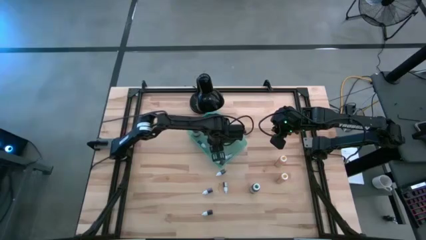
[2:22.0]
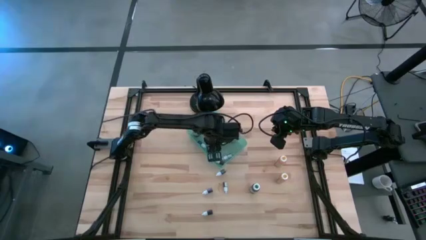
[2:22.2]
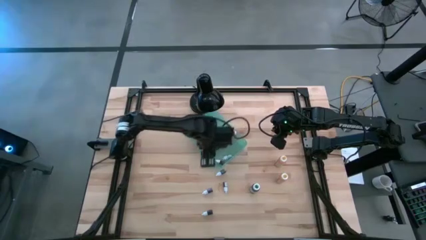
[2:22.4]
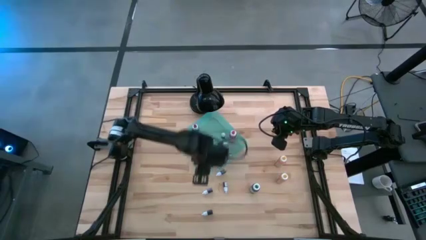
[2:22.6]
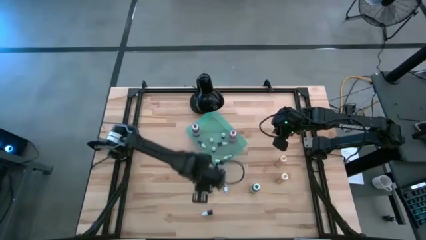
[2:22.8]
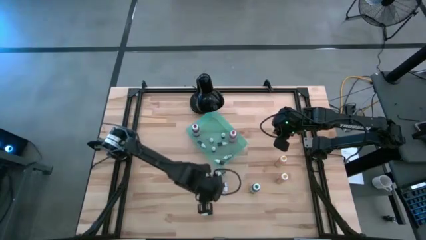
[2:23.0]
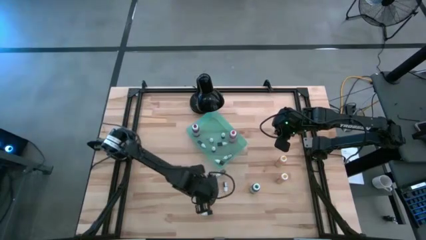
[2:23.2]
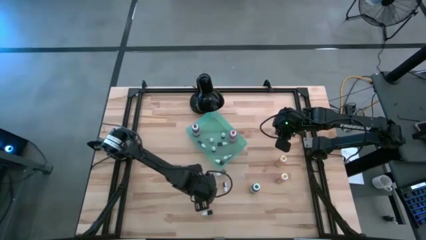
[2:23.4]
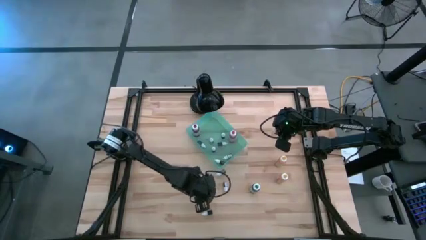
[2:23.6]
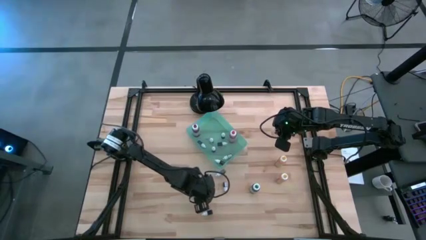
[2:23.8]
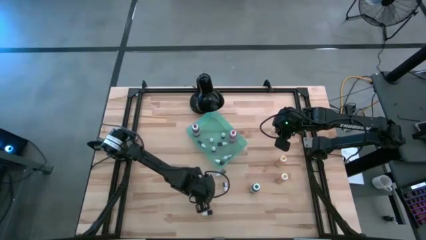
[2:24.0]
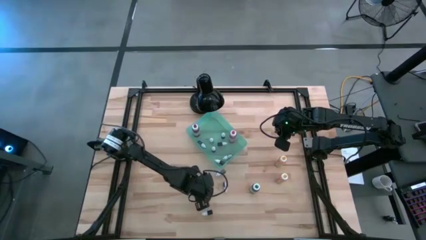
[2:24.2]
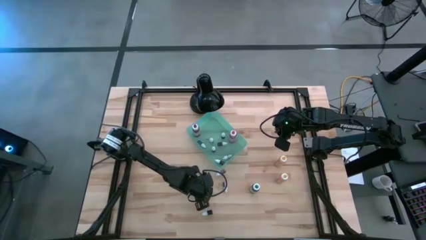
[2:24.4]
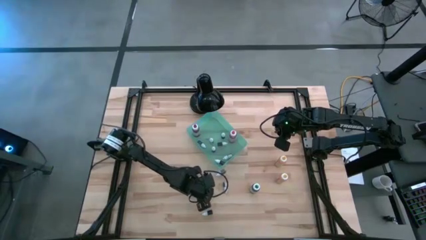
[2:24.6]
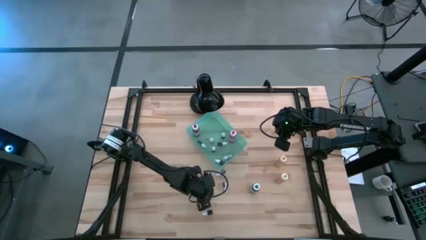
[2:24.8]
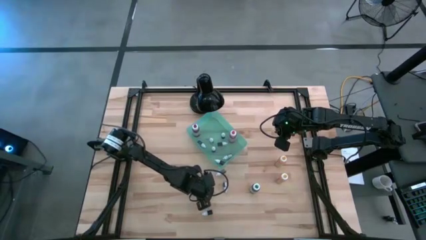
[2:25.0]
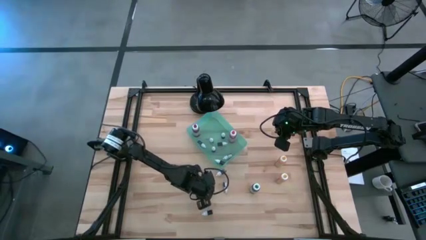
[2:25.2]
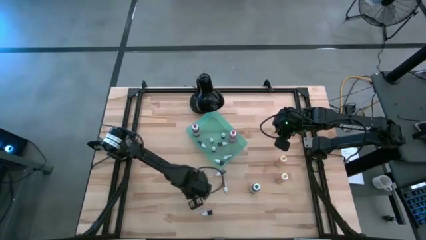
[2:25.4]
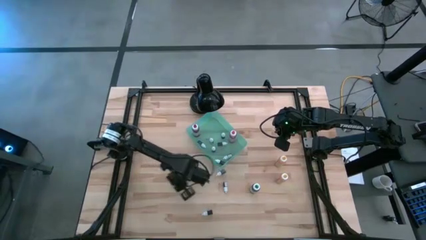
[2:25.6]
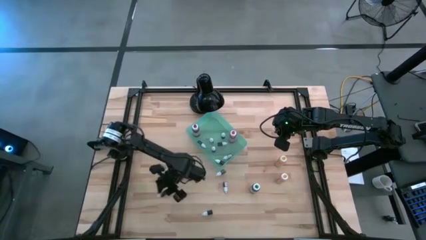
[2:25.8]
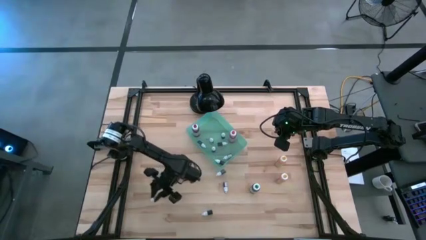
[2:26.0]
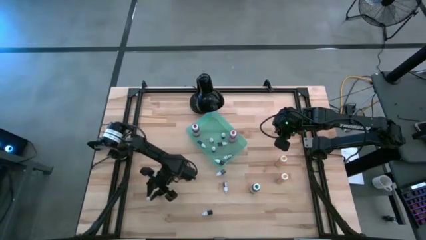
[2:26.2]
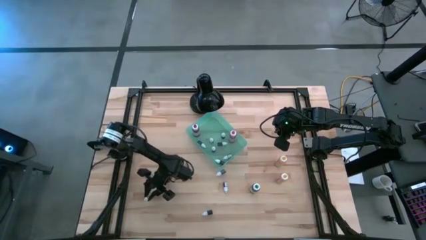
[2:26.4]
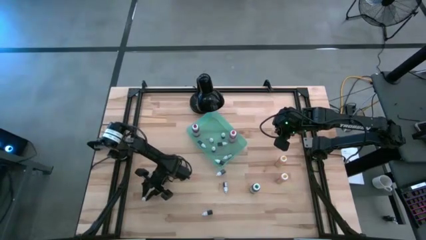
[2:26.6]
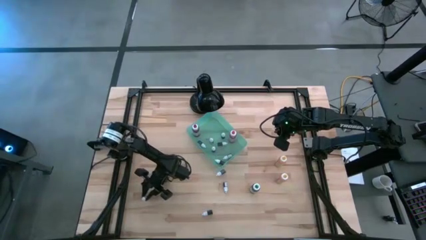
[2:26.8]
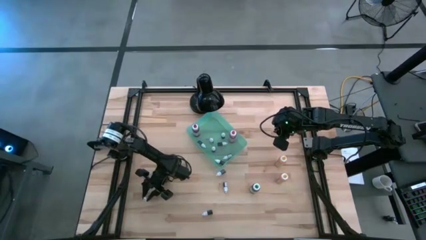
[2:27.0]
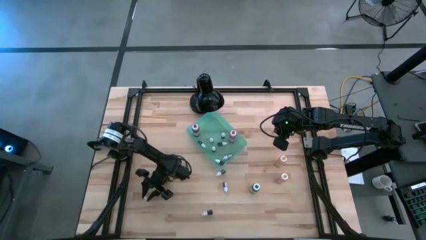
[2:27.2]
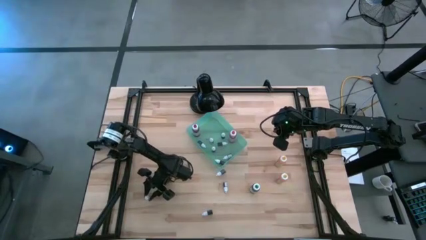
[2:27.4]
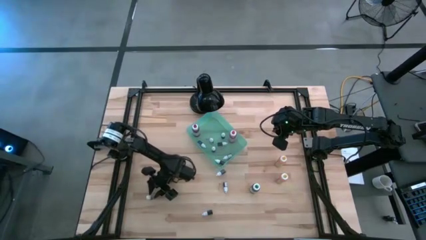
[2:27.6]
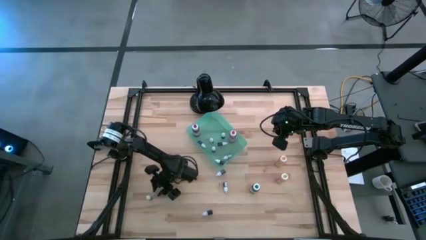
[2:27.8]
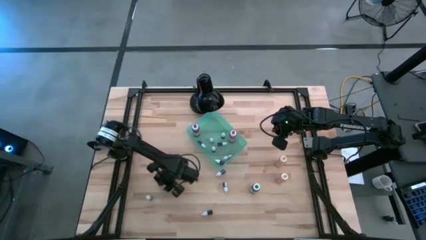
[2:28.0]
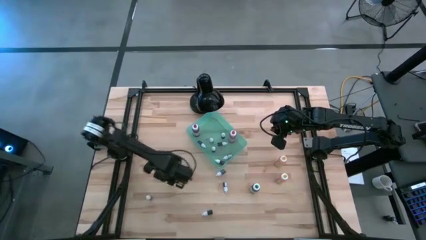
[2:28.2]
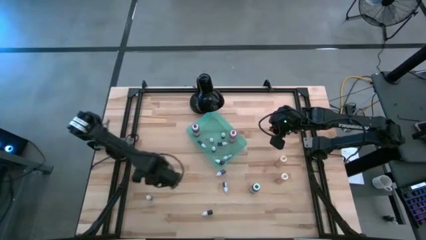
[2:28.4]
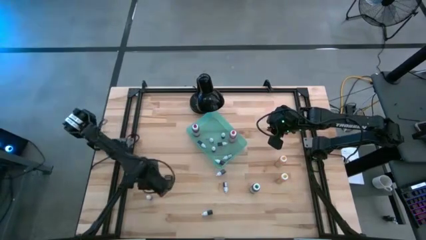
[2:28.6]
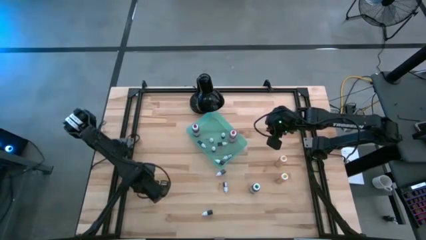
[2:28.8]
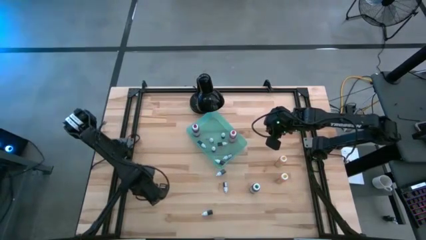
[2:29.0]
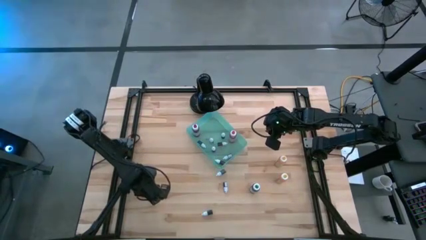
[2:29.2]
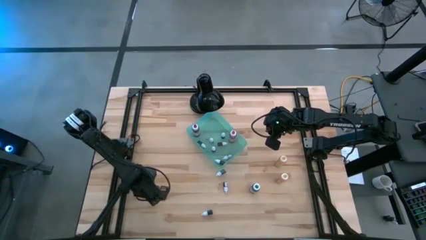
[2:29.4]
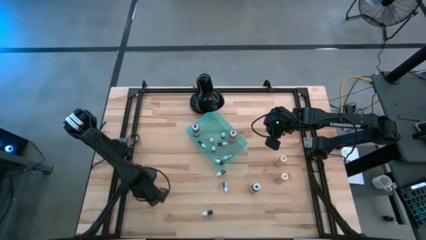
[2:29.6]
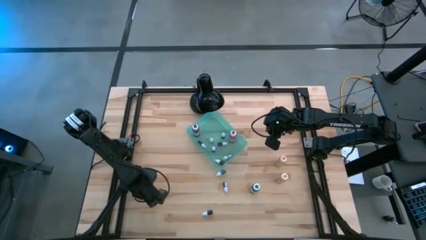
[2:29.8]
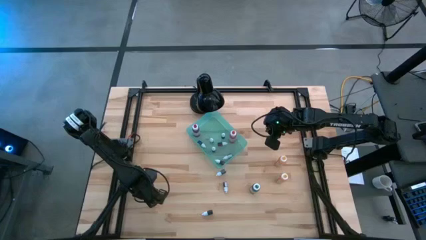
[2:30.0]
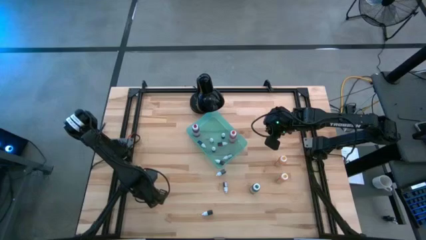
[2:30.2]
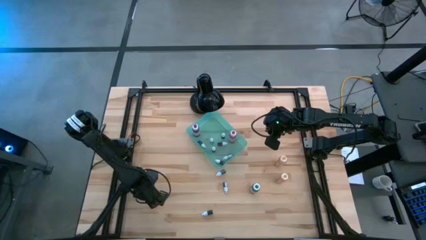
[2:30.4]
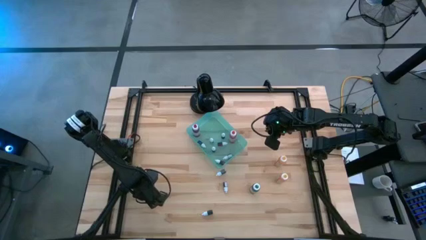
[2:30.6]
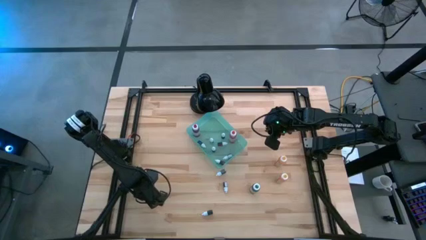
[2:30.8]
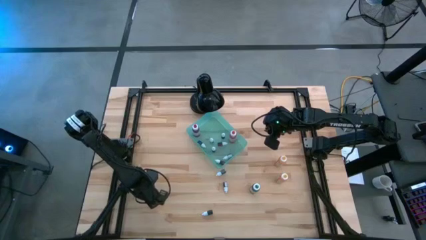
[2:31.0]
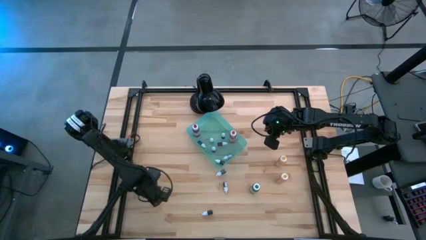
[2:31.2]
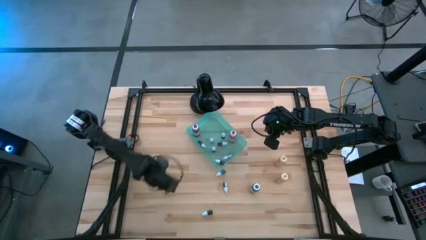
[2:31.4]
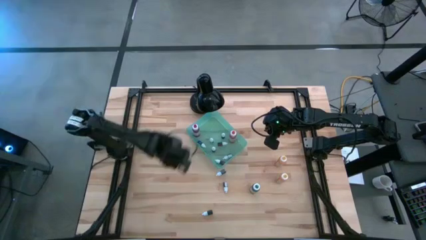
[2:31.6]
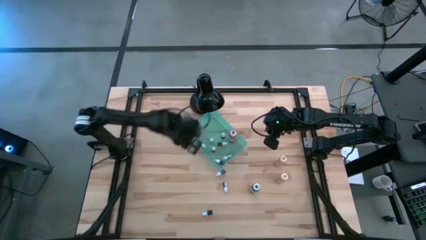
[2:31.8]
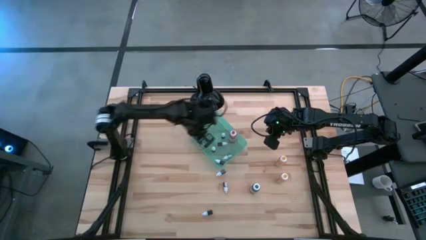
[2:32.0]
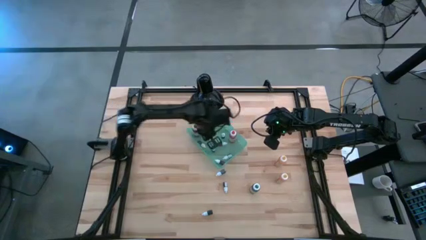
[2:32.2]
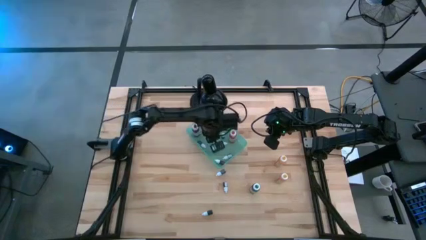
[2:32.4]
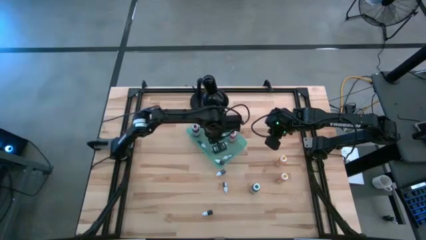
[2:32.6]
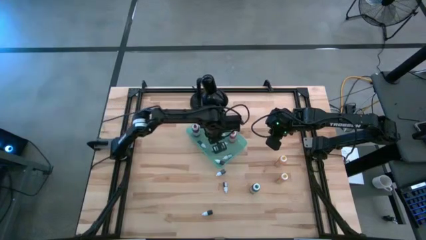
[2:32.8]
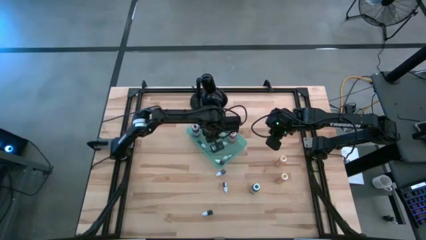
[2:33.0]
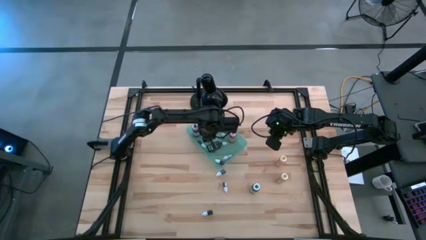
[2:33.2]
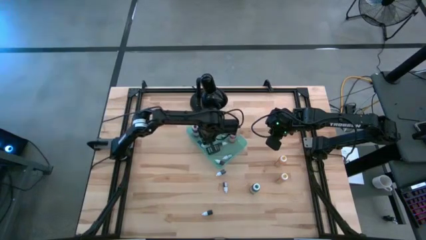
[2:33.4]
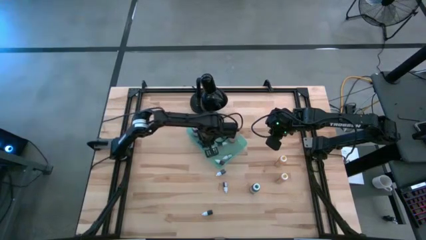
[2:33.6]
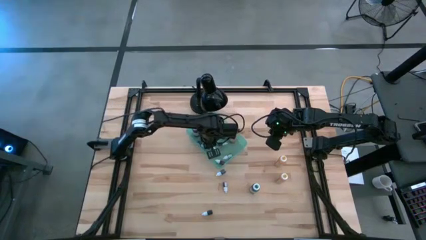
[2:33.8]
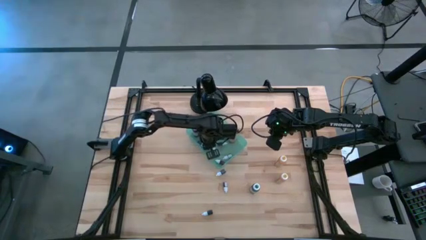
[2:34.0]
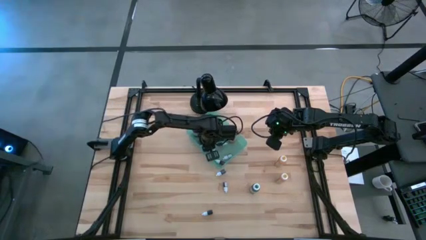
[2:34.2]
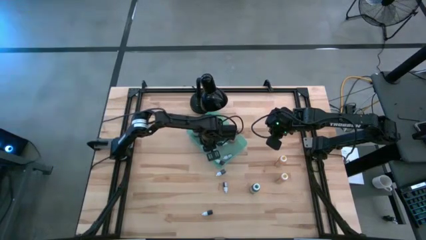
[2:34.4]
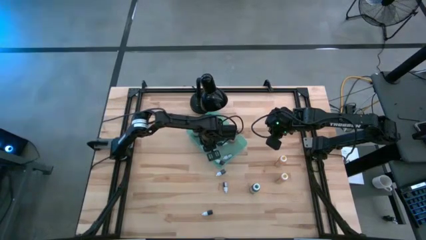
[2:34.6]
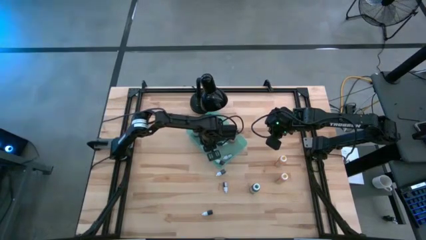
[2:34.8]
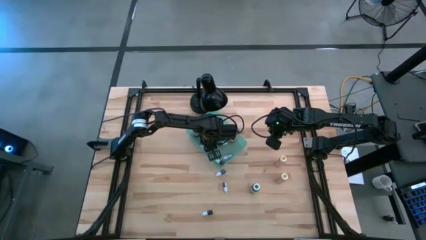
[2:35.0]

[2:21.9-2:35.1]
Task: Pick & Place food coloring
Put the small purple food coloring bottle into the green bin

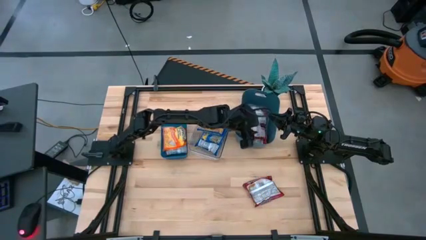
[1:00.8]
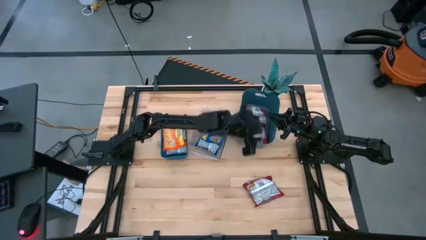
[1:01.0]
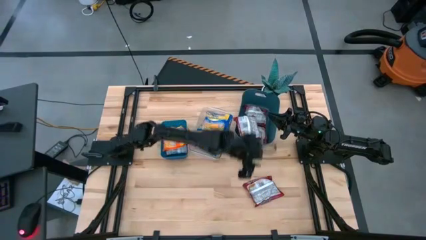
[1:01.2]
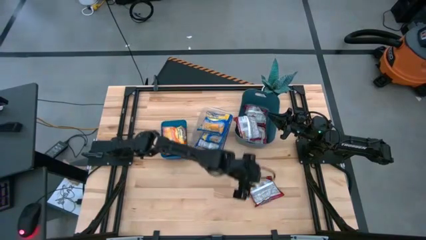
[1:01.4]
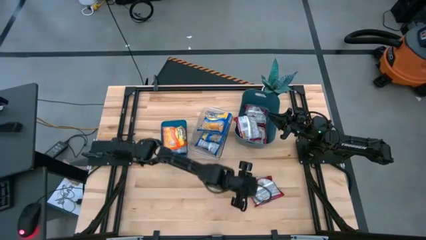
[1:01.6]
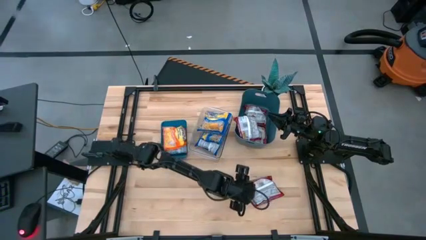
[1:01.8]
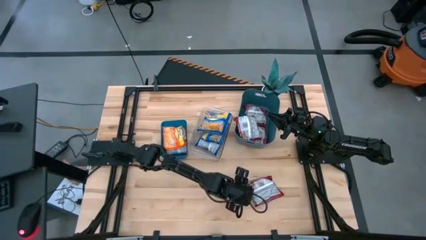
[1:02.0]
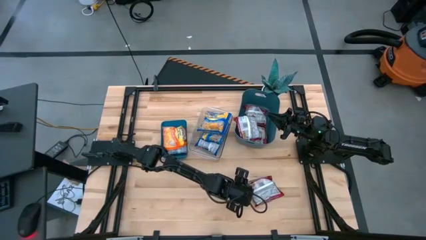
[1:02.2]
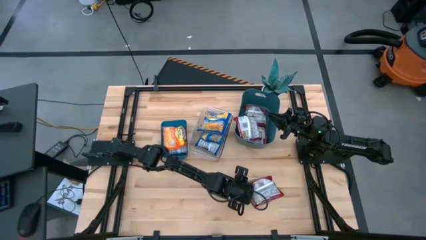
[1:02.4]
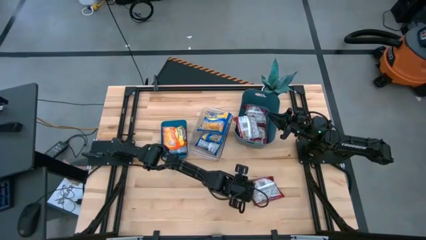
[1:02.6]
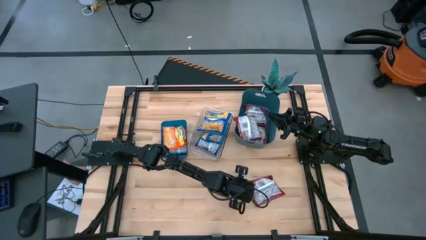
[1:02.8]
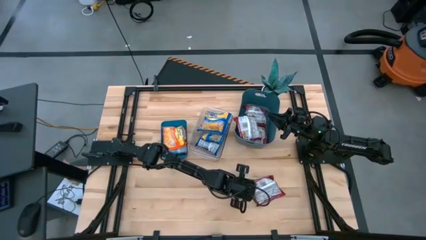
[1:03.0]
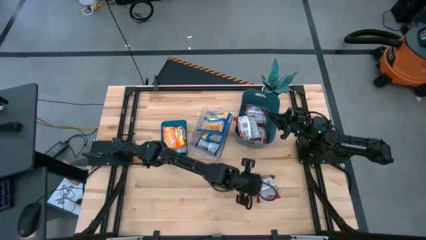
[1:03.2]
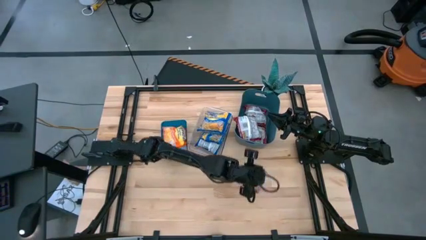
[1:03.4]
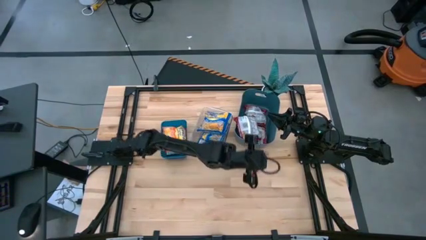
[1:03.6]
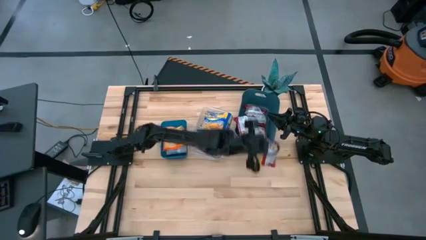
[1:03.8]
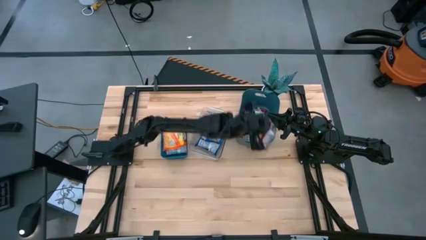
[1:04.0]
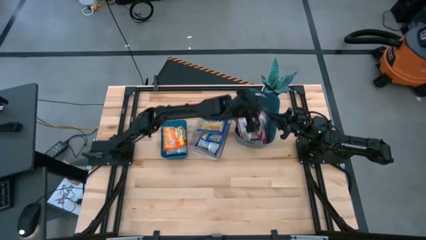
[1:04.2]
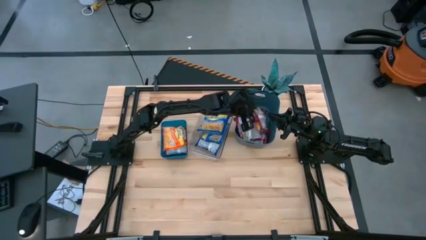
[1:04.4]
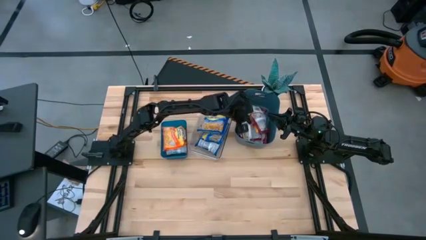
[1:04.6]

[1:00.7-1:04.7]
Task: Sort Maruchan noodles
Put the red noodle pack into the dark green bin
